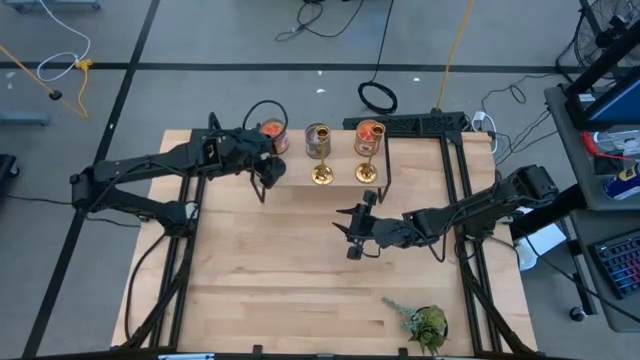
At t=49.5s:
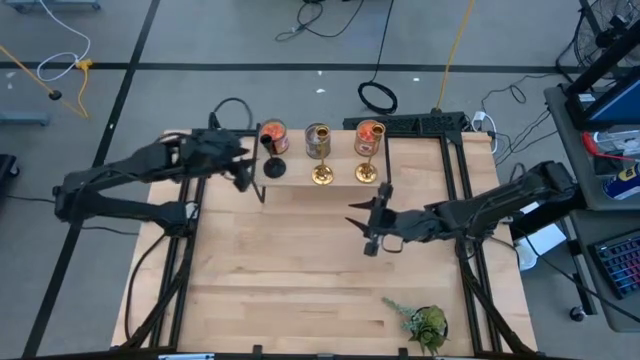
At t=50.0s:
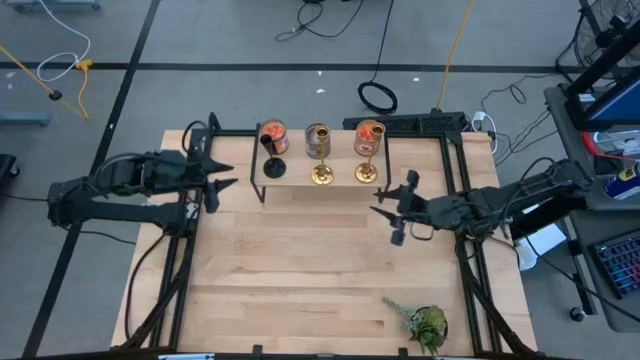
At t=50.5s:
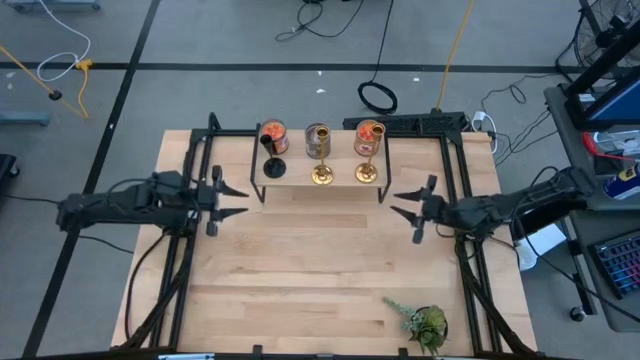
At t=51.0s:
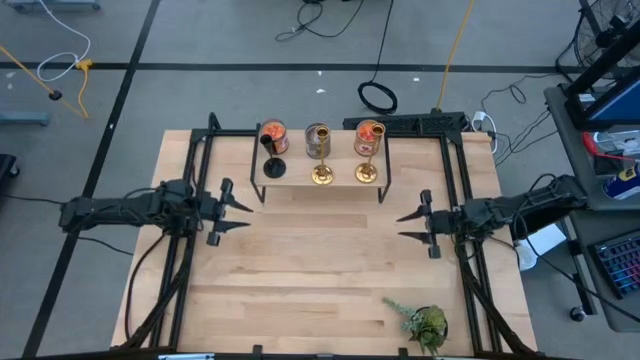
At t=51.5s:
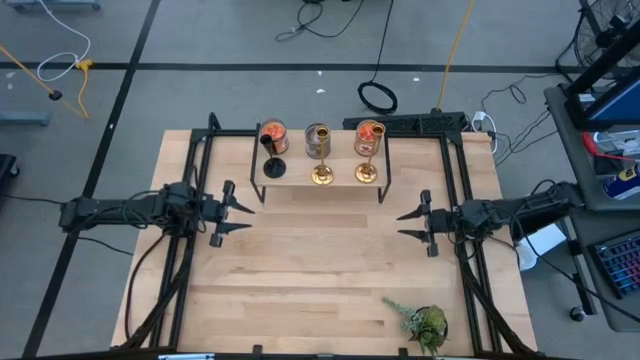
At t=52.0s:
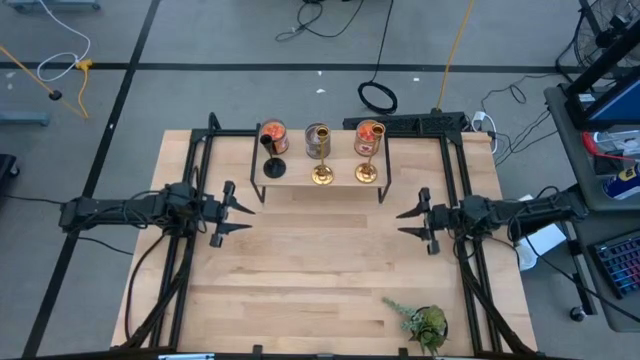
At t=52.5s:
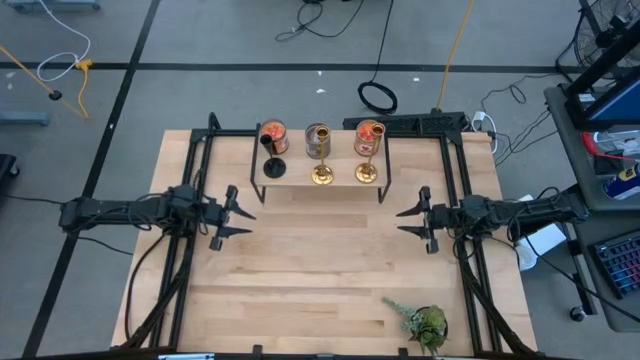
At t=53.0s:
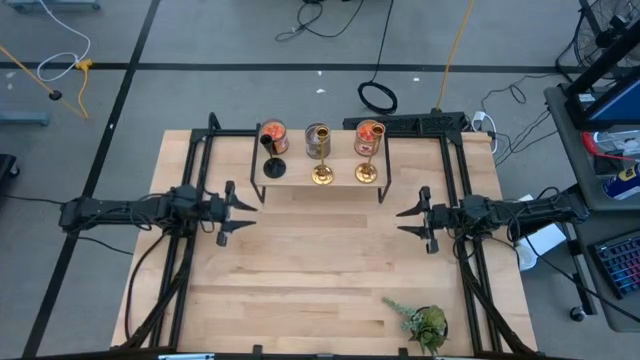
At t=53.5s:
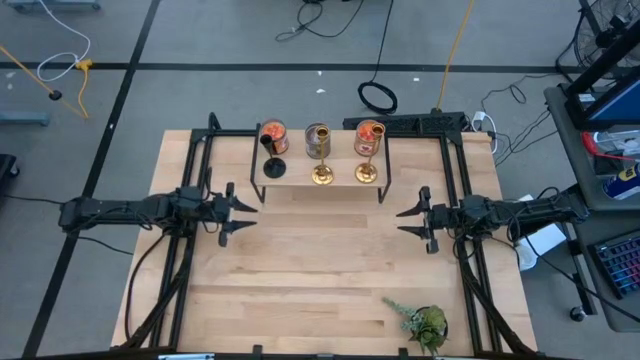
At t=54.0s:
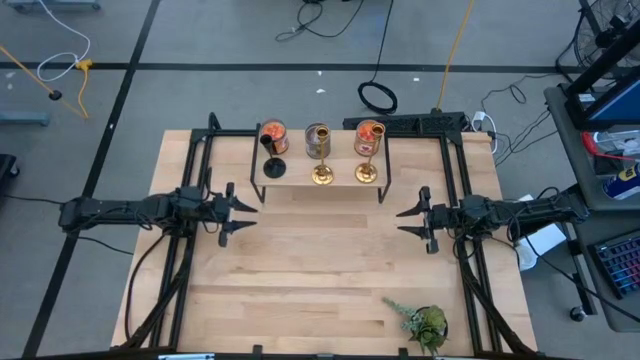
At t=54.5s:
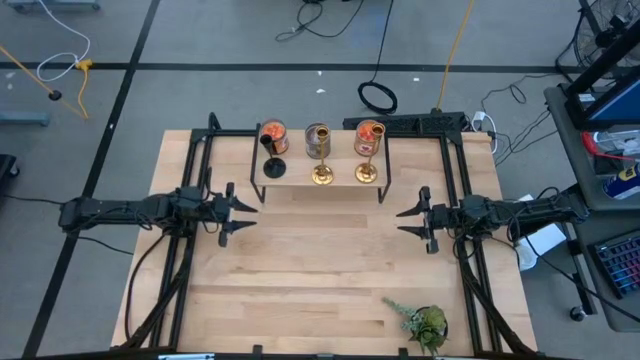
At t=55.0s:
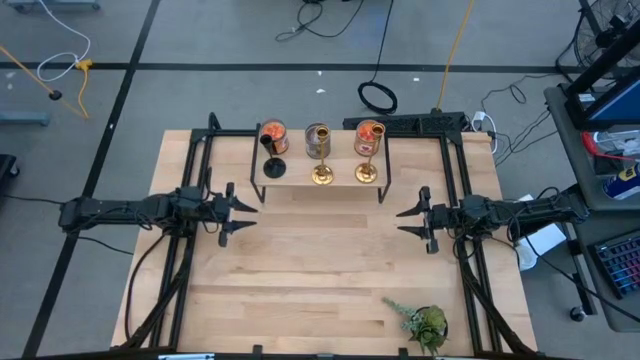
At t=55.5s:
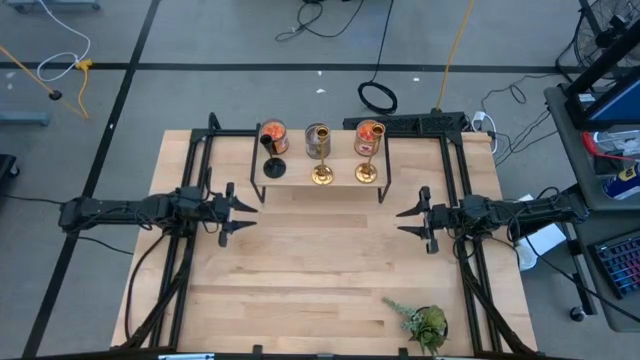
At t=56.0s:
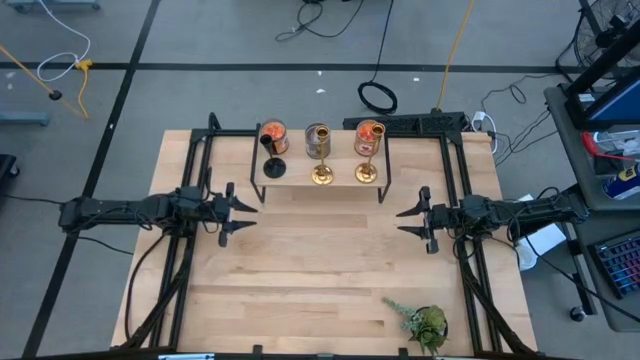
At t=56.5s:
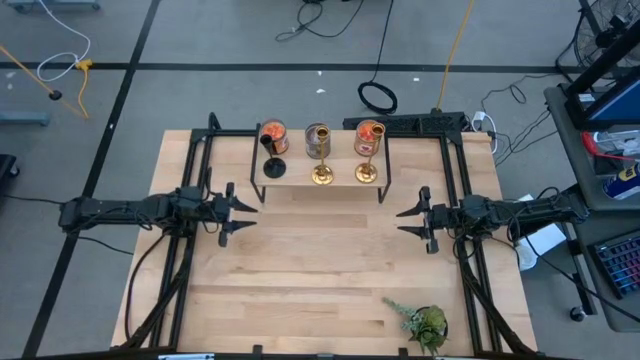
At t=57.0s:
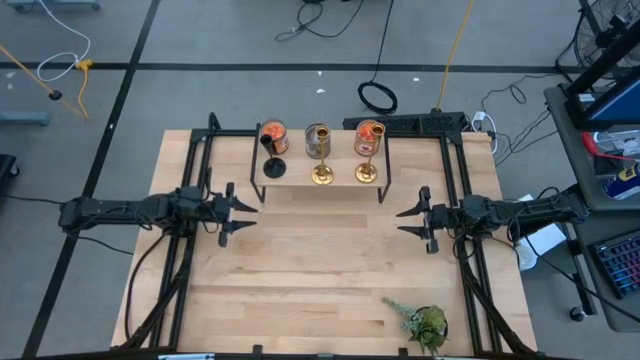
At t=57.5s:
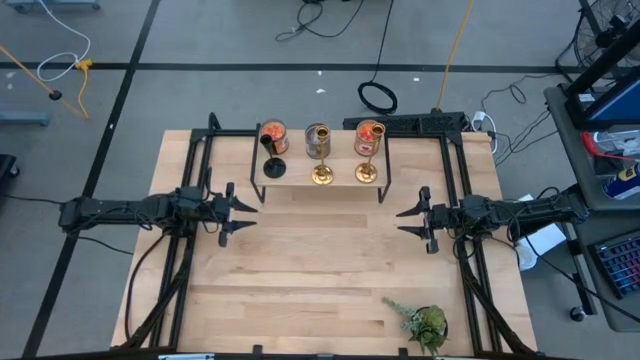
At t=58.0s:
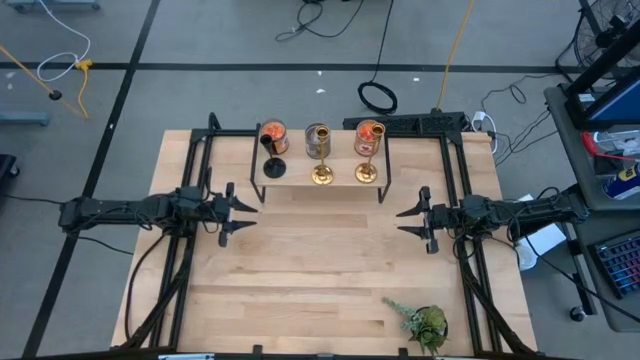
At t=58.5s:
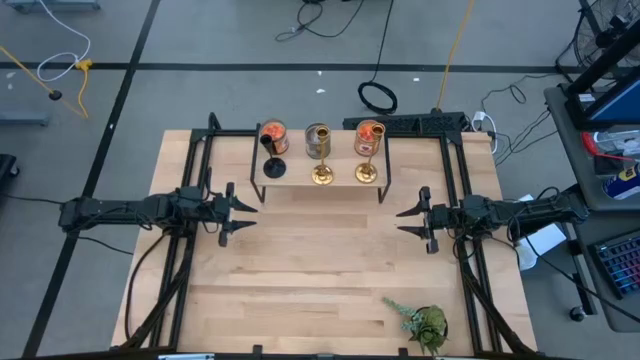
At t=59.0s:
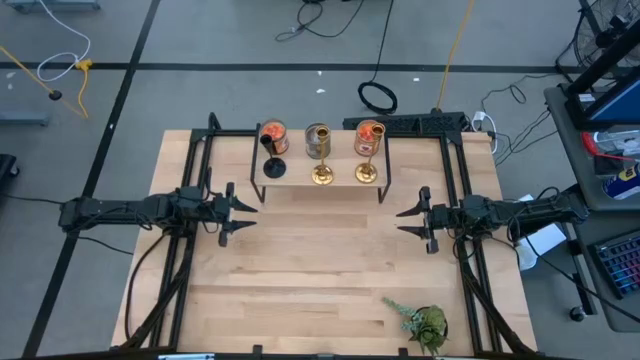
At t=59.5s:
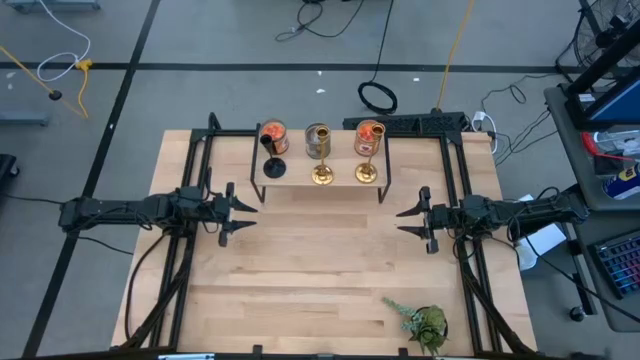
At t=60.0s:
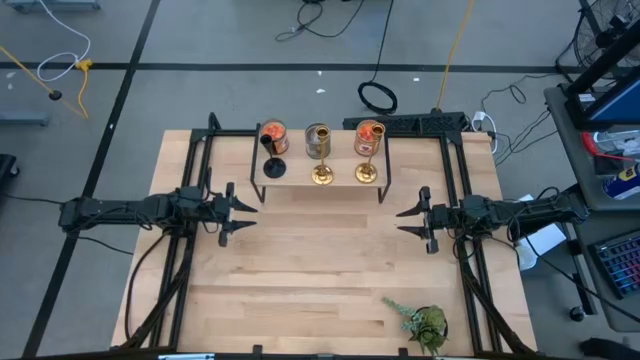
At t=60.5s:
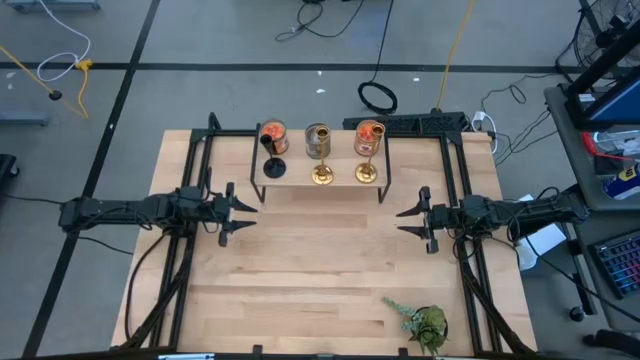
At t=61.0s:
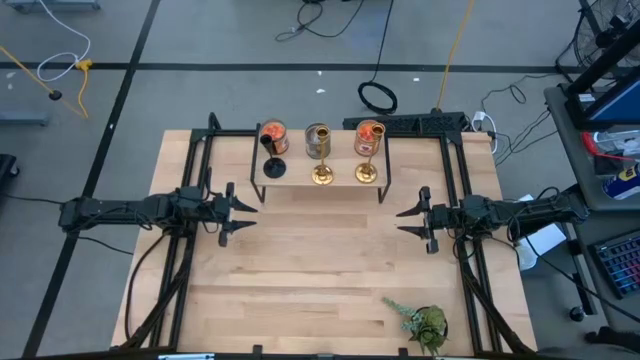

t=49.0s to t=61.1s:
Task: Pick & Place candle stick holders
Return to Home Position

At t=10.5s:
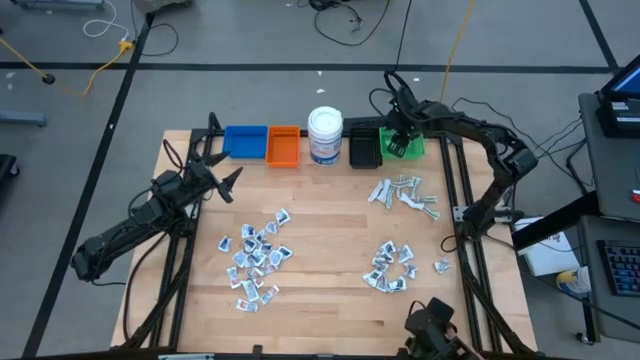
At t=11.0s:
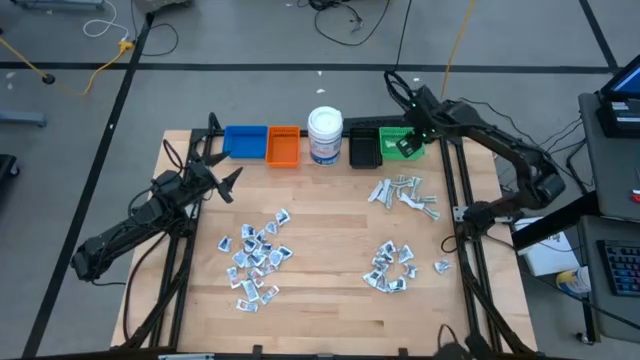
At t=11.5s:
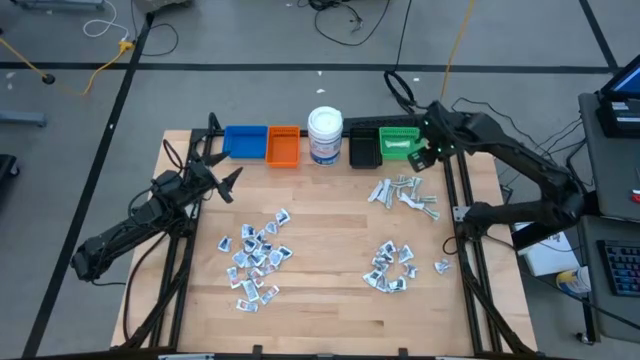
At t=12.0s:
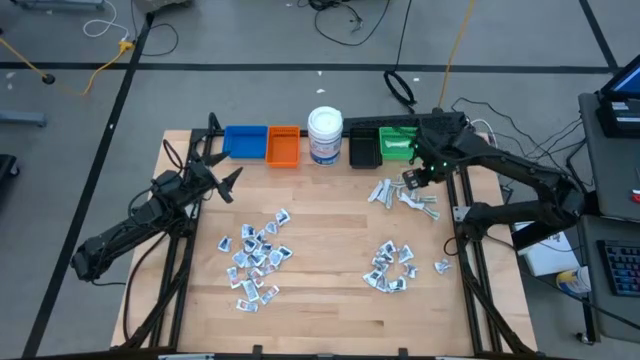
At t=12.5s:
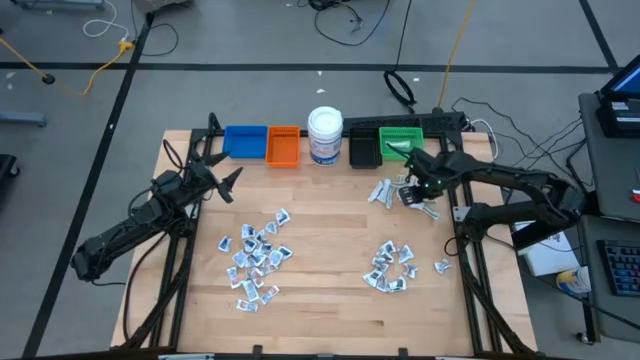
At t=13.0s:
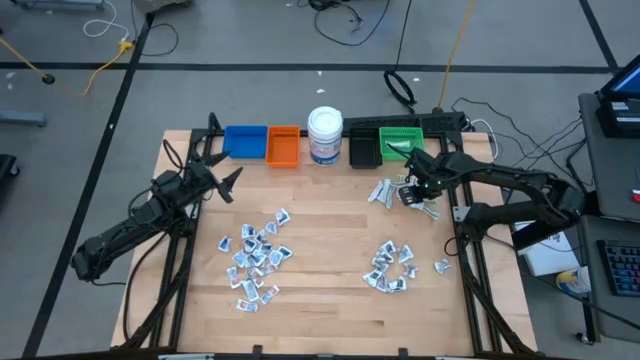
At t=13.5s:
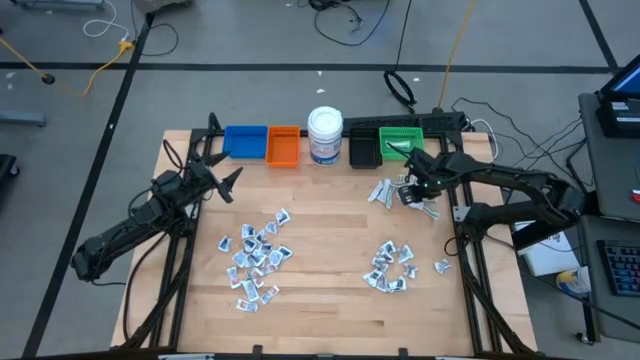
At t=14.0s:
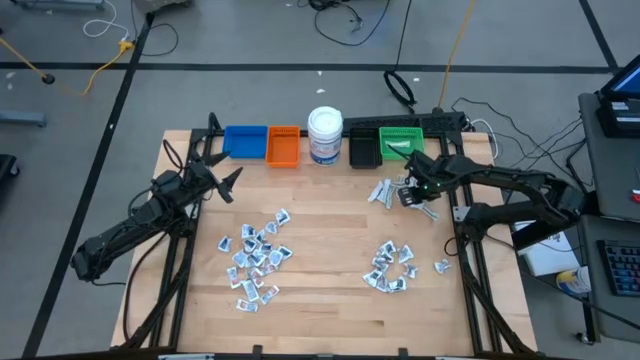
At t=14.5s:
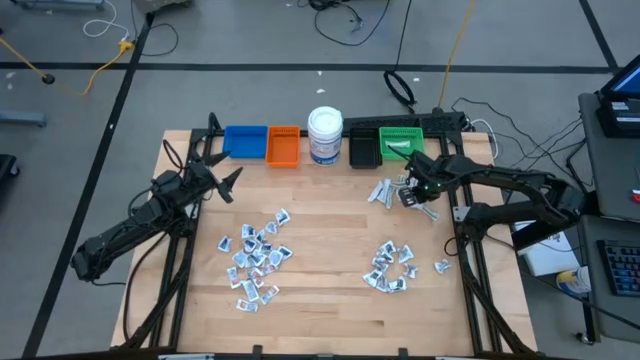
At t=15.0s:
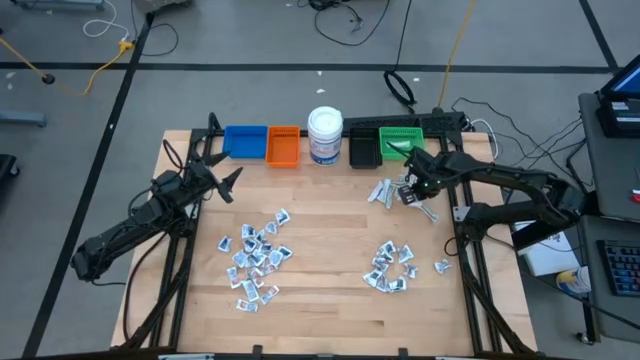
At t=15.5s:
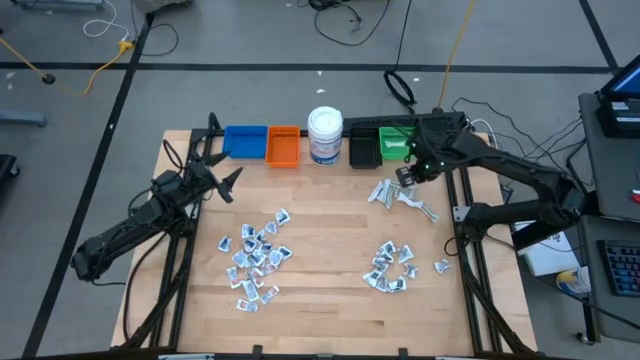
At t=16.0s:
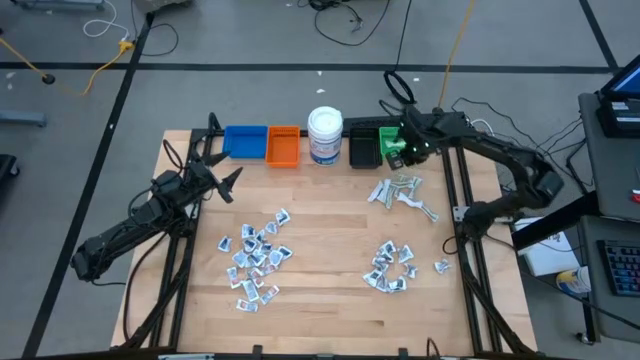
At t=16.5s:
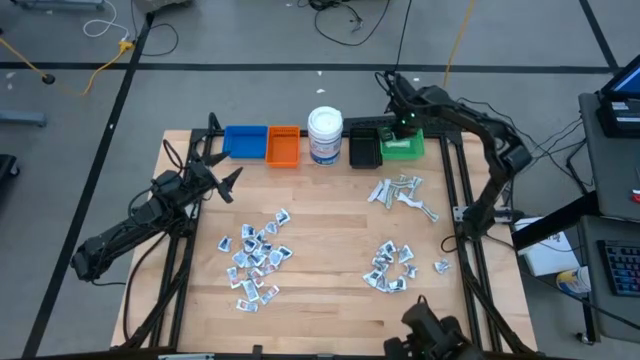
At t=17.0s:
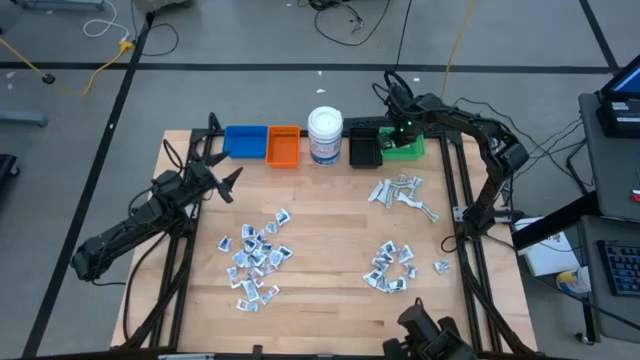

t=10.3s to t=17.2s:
Task: Pick & Place First Aid Supplies
Put the bandage into the green bin
